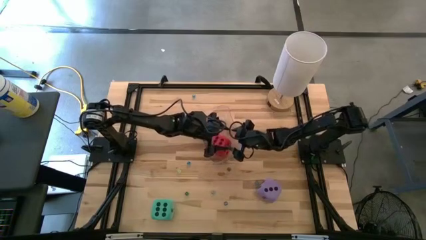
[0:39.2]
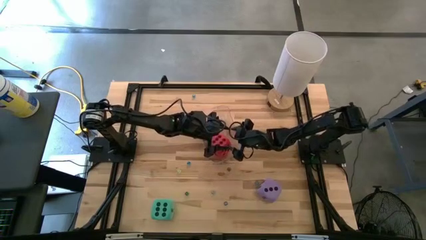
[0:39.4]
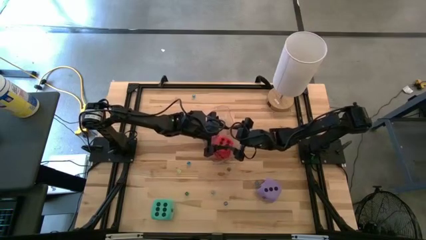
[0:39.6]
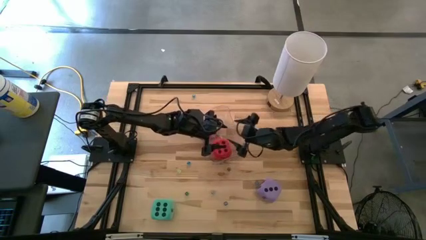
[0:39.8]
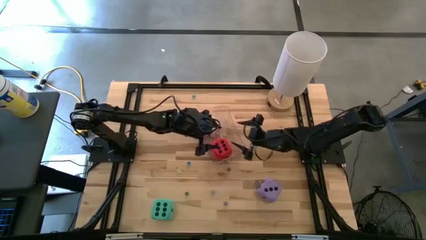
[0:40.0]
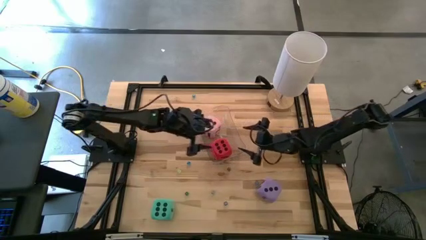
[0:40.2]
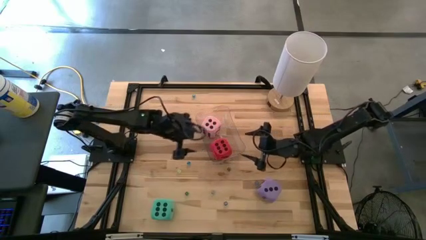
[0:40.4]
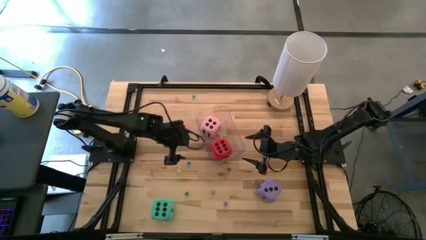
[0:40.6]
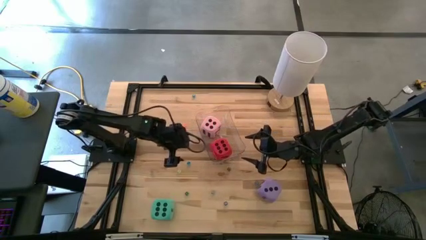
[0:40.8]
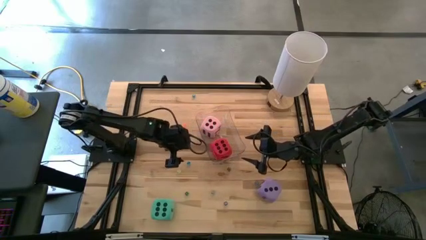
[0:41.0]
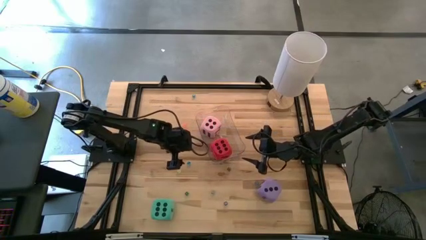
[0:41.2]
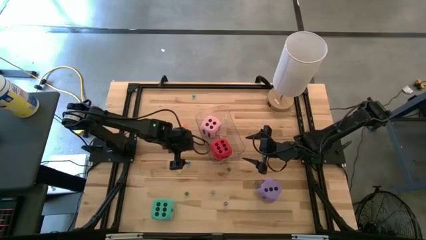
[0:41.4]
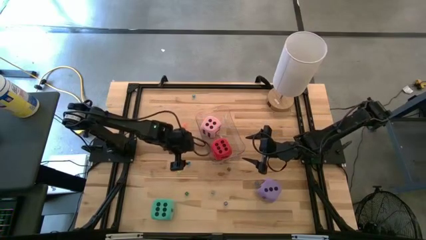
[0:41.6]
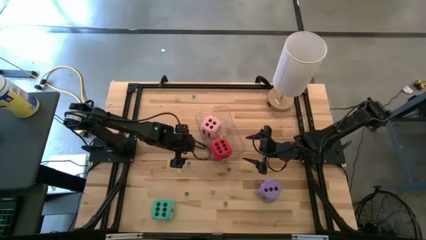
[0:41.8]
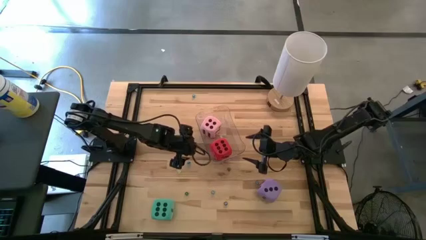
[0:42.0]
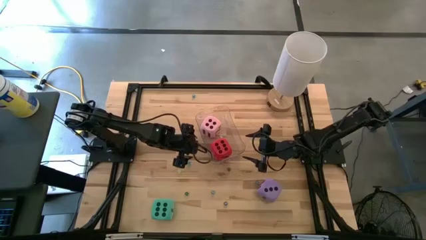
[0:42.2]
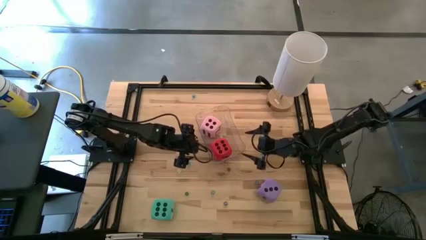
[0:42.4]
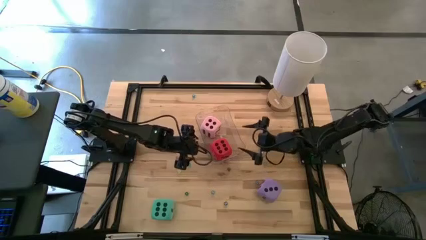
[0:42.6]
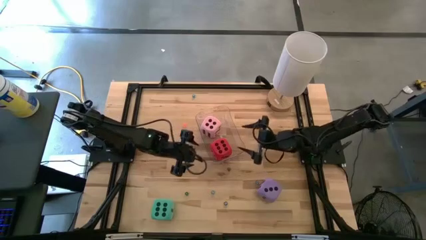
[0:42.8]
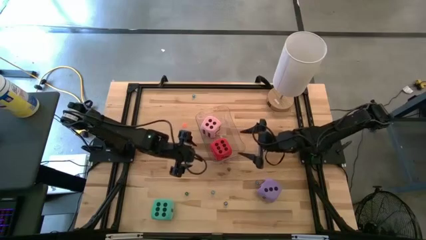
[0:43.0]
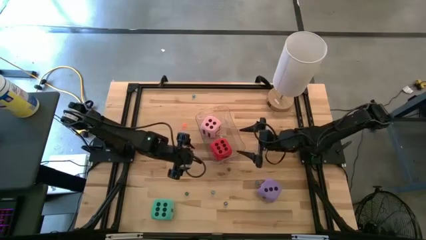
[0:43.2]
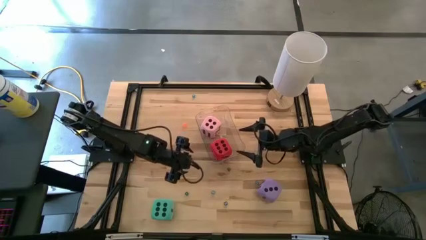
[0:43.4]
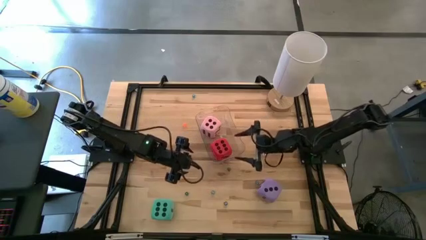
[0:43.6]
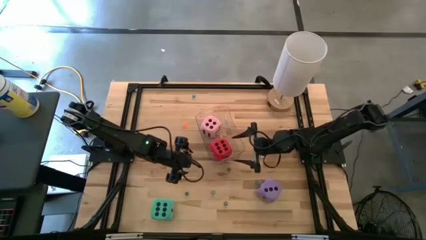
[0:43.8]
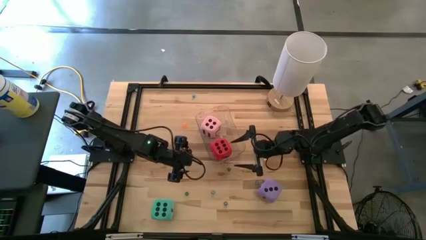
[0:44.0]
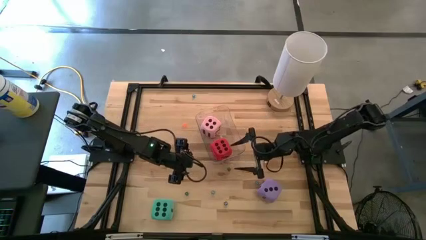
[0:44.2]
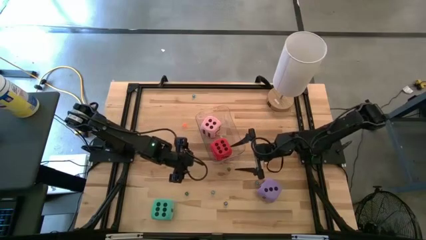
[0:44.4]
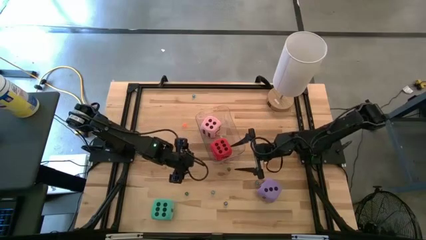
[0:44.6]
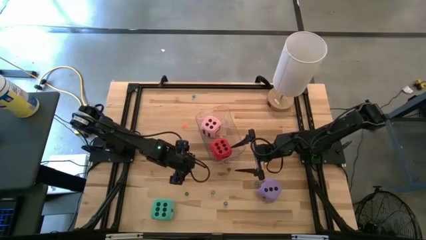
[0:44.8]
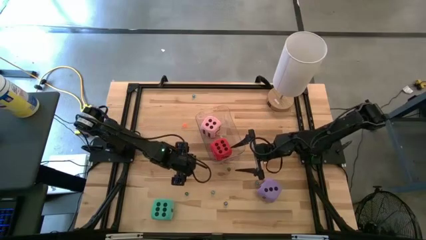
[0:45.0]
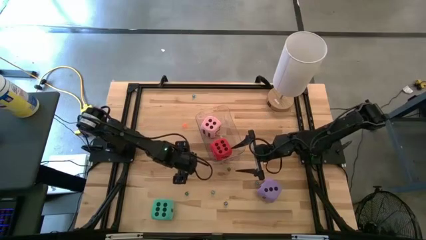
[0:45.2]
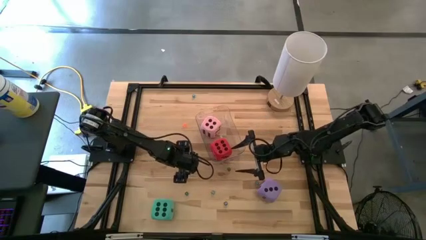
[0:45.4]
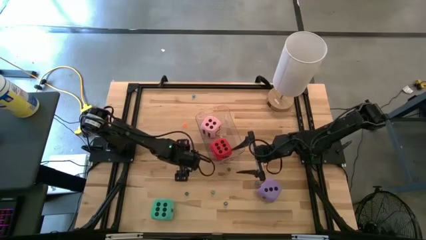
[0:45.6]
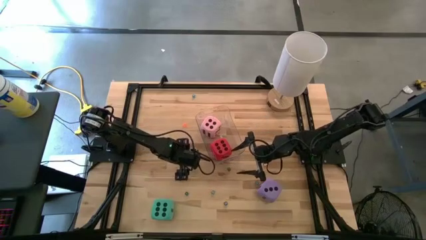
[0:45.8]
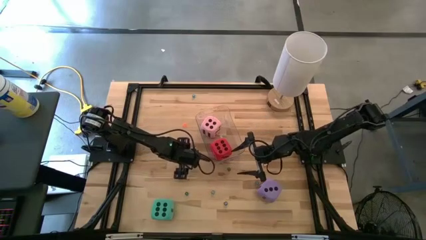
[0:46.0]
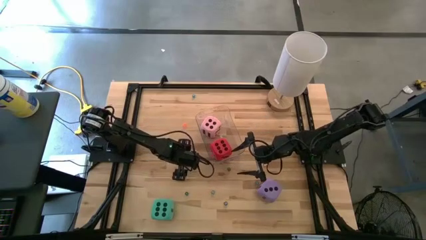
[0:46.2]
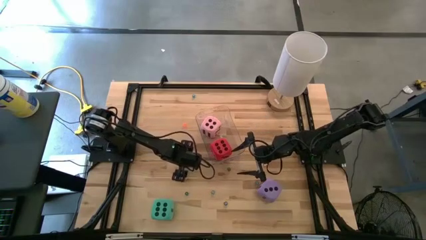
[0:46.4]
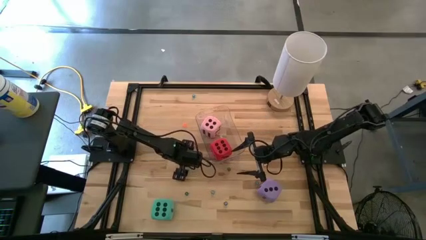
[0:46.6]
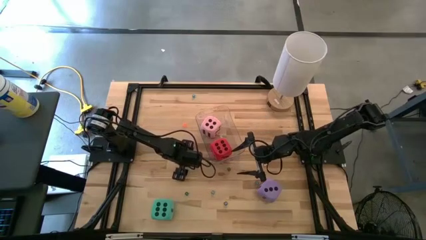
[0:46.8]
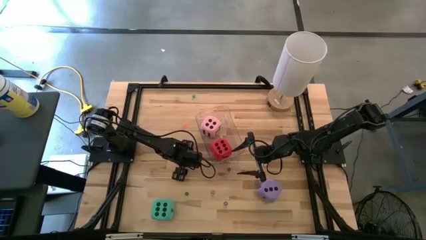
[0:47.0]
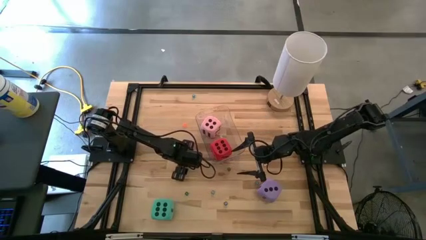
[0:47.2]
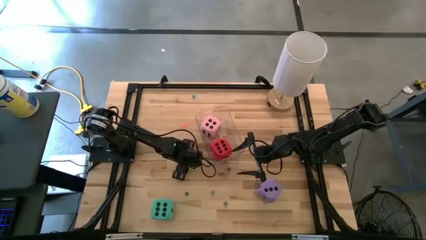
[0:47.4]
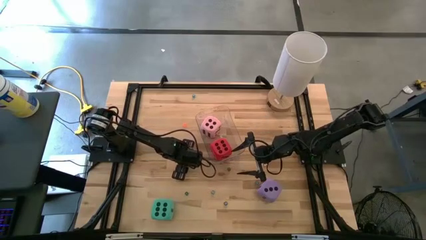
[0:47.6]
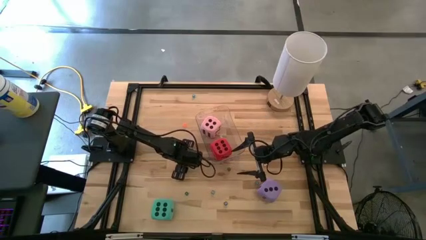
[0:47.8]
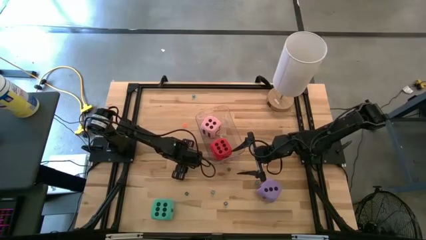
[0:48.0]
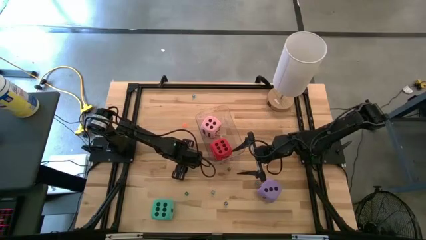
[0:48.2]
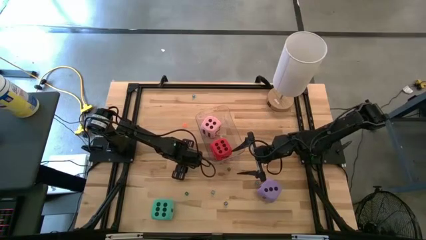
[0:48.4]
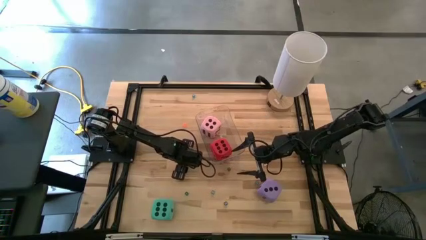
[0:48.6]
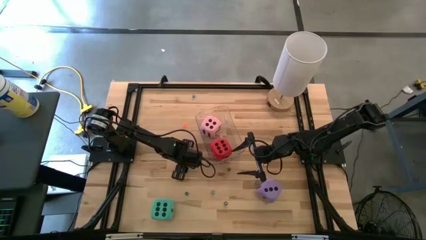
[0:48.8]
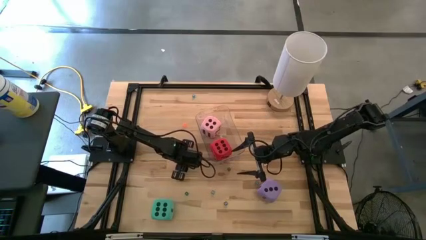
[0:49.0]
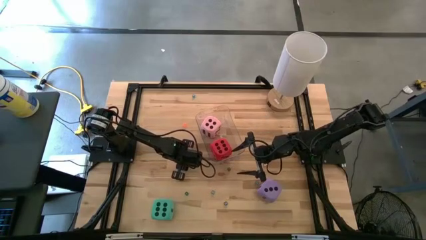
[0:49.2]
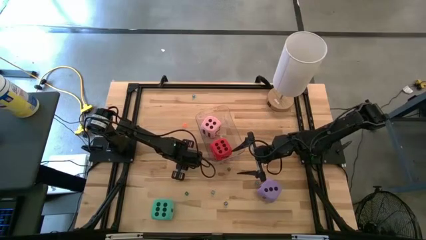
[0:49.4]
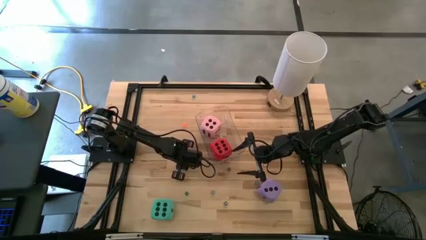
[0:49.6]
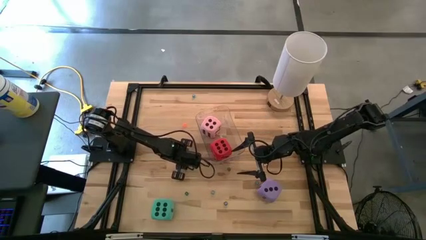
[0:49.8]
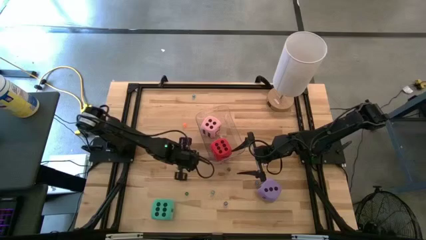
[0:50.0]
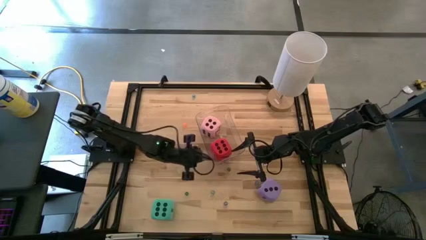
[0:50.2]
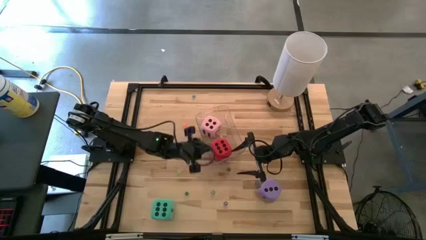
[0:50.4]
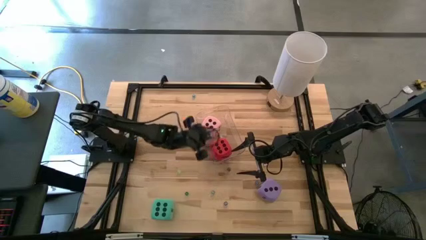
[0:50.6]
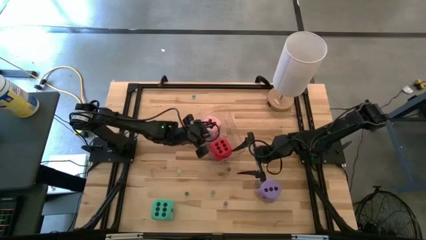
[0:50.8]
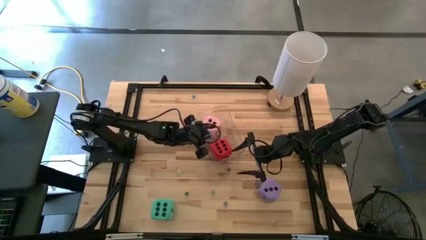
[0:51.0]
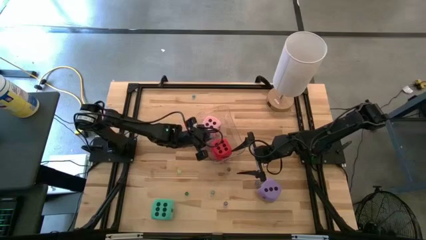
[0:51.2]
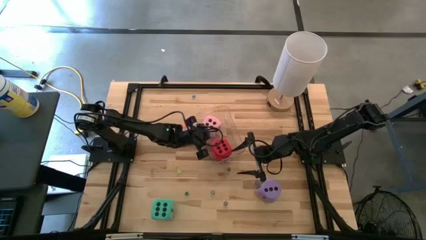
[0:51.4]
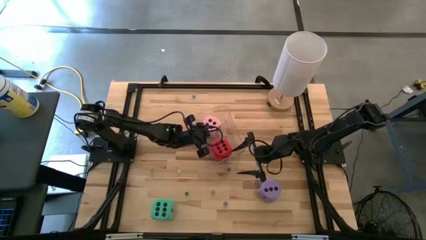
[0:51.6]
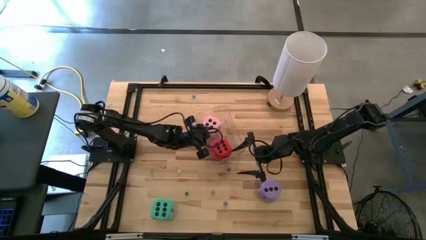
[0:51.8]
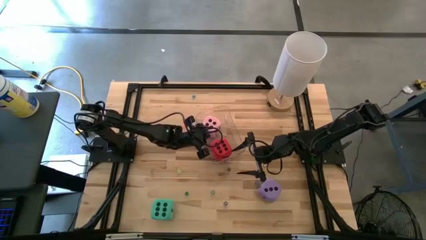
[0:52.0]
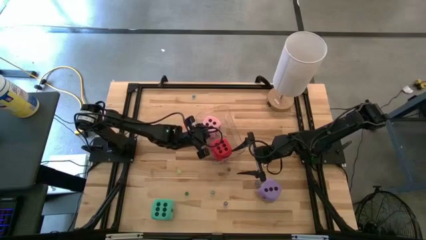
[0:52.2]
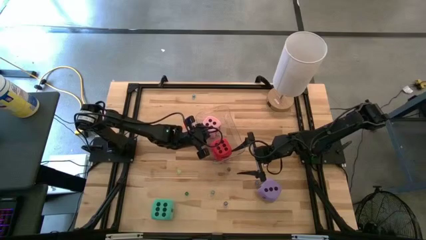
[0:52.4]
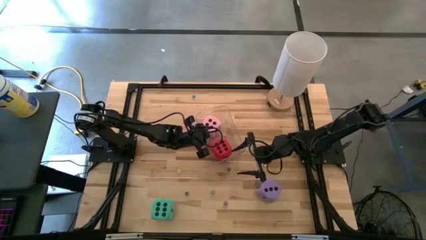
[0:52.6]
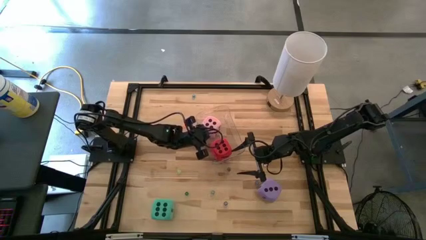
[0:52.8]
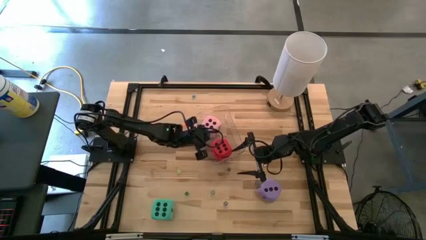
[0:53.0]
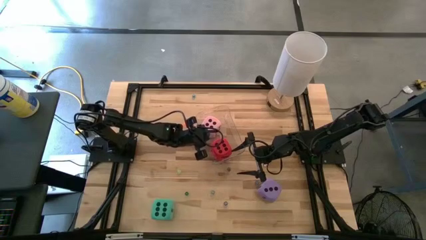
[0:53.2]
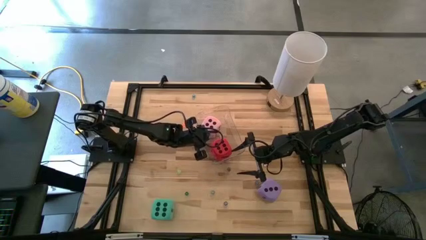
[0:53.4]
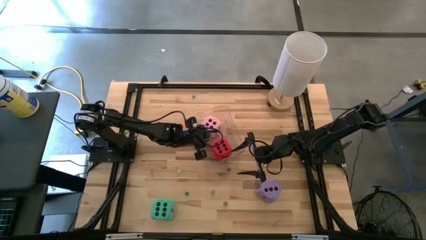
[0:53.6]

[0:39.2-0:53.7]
Task: Pick & Place Dice
Put the small blue dice into the transparent bin

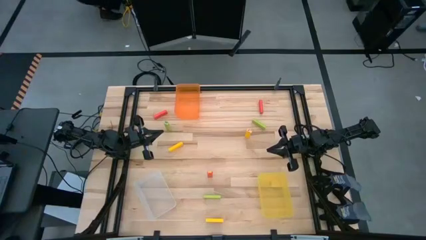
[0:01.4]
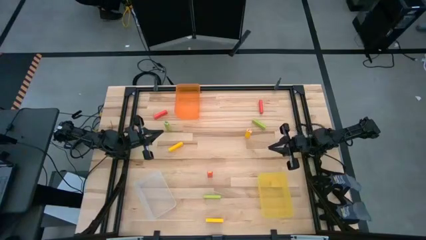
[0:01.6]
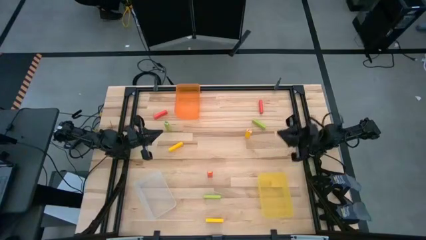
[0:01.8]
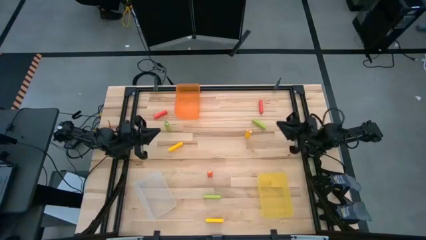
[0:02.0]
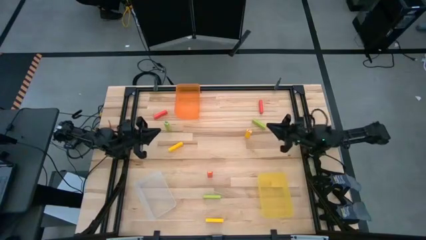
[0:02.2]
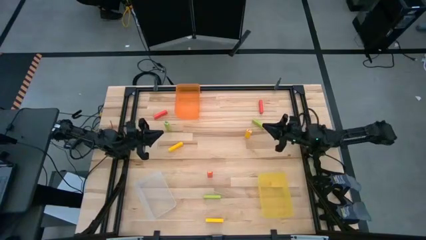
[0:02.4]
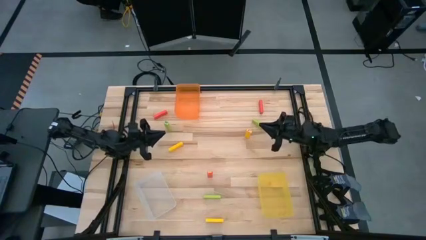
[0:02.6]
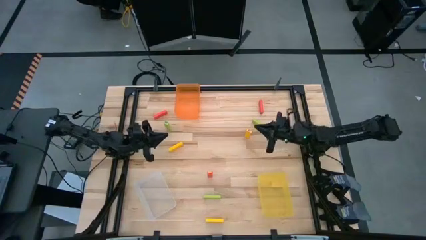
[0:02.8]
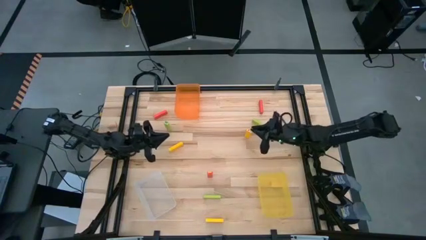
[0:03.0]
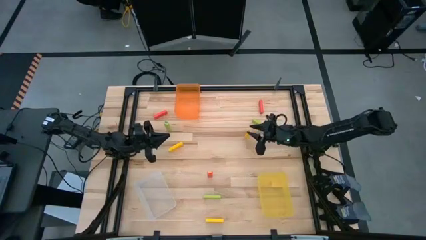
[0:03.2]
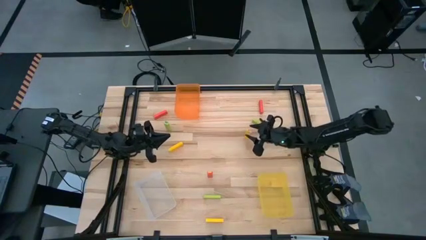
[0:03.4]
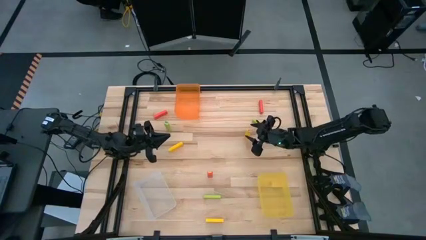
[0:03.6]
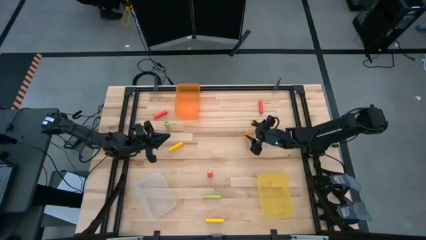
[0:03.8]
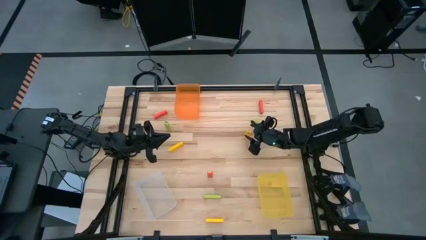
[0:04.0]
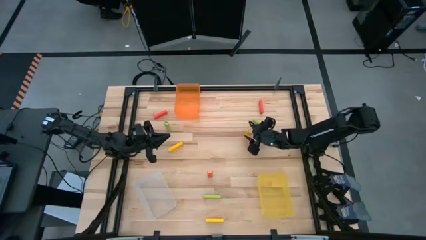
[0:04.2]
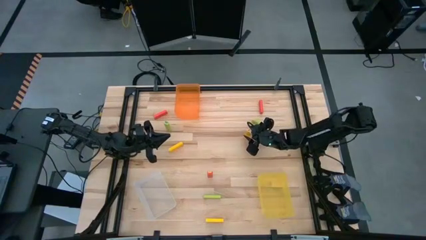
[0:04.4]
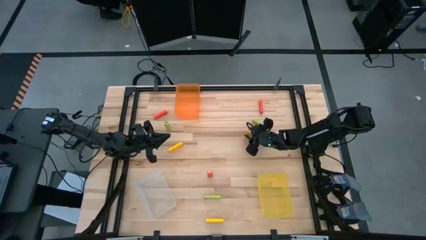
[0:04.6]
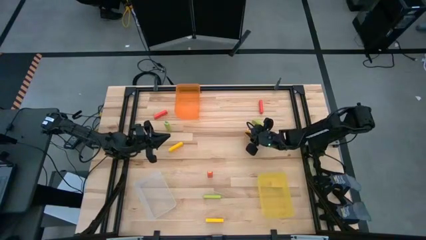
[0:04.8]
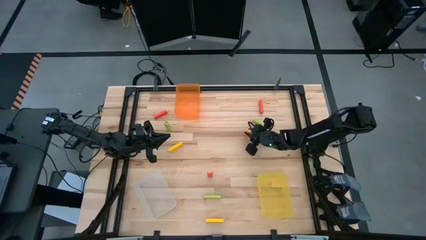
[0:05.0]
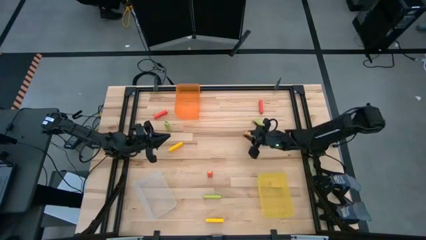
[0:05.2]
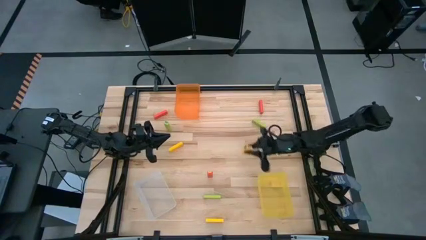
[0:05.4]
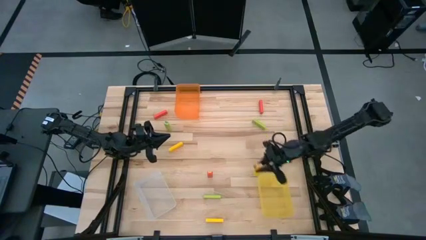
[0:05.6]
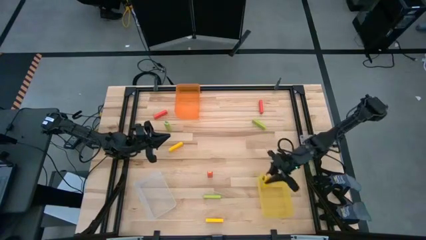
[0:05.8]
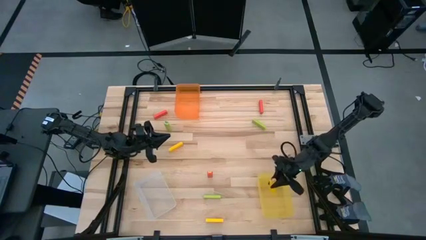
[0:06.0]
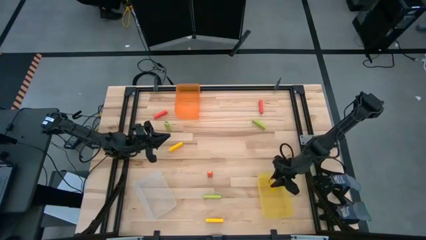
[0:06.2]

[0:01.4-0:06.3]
Task: Sort blocks
Put the right yellow block into the yellow bin
